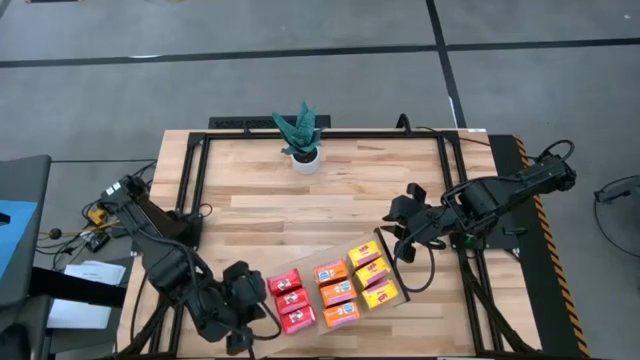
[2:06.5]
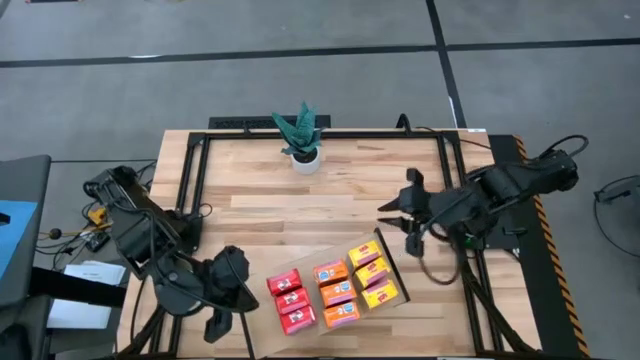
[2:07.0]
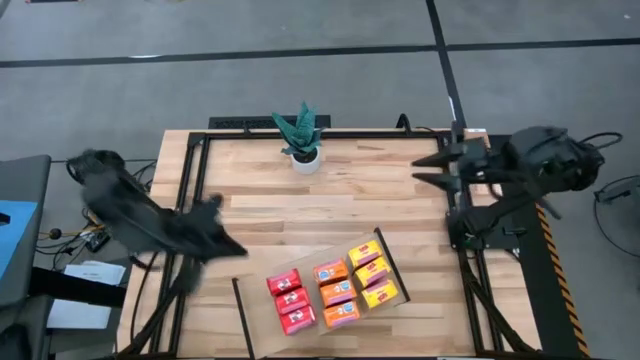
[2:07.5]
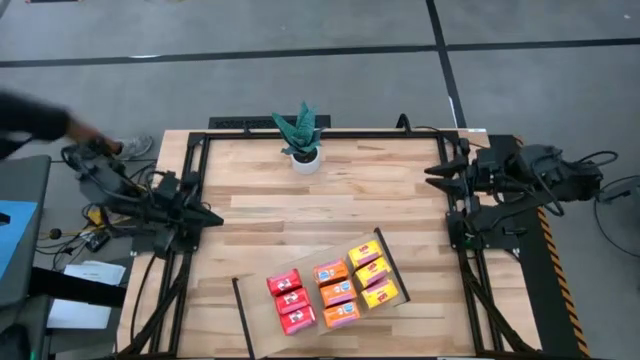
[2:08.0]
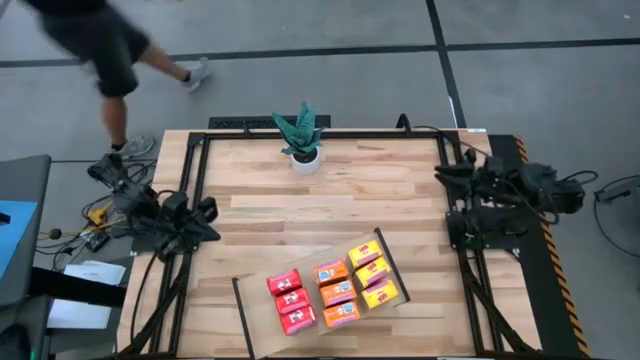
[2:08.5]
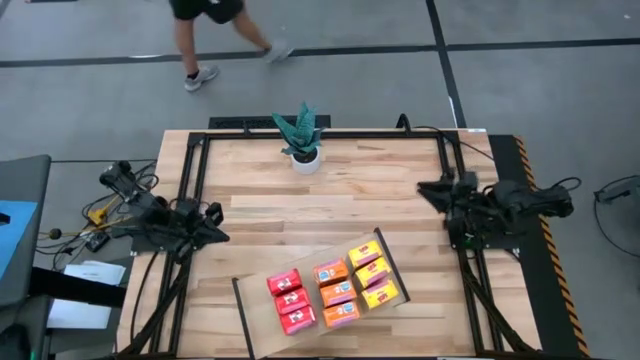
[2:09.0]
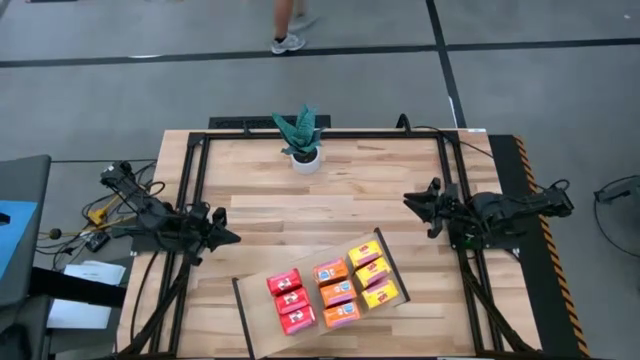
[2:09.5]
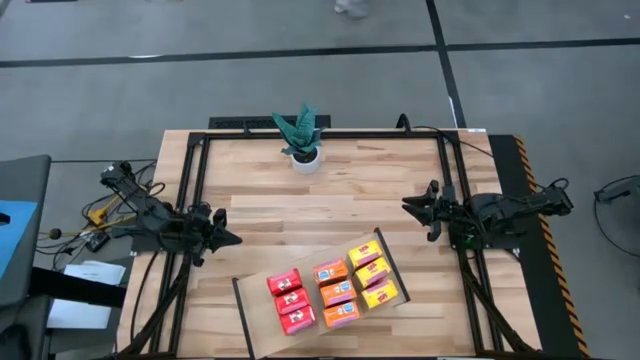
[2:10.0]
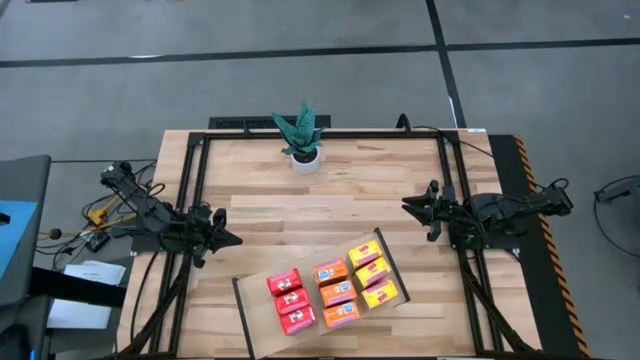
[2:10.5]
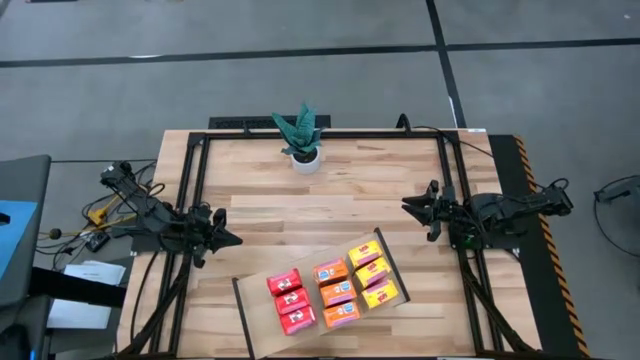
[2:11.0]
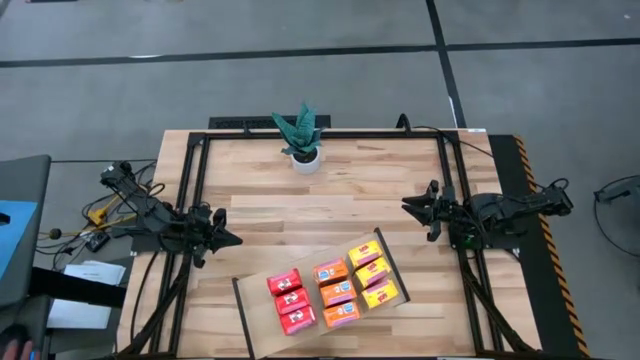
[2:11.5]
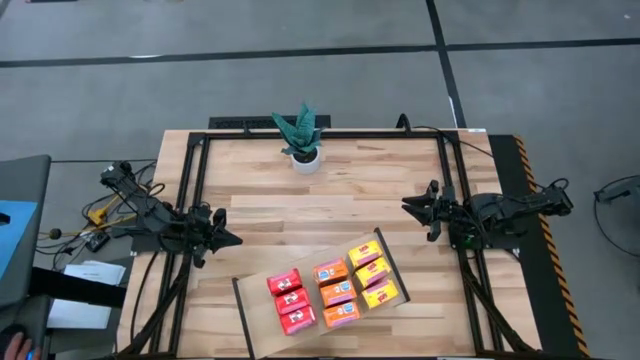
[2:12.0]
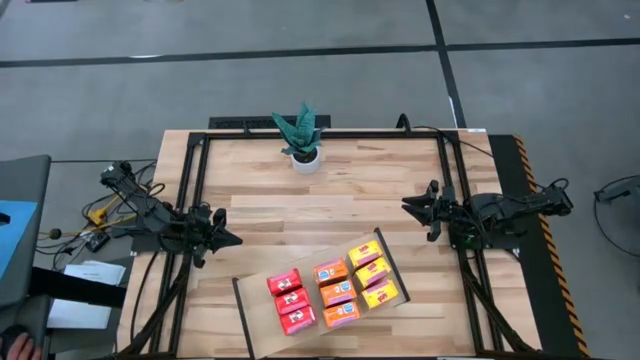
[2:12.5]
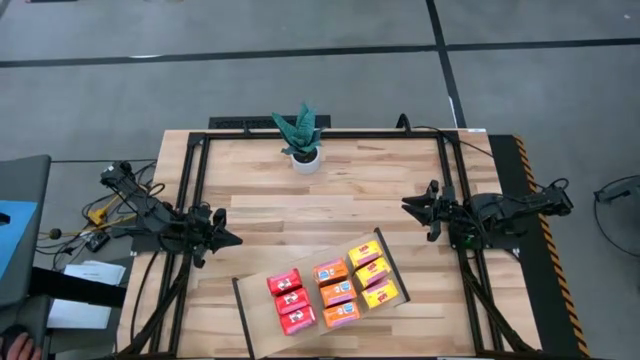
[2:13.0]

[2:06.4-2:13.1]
Task: Stack cereal on shelf
Return to Home Position

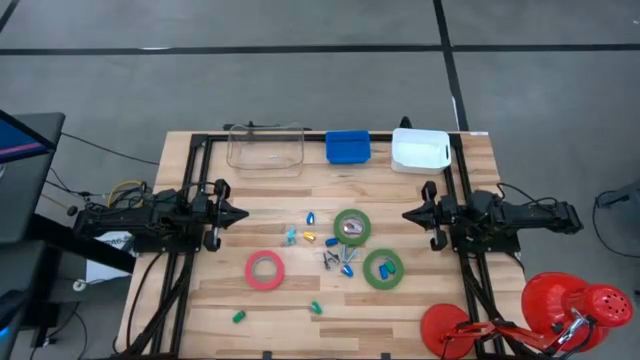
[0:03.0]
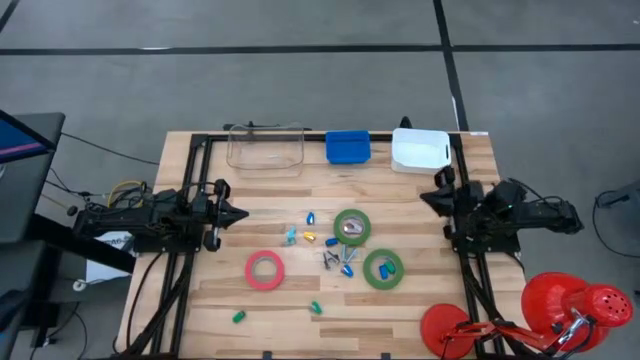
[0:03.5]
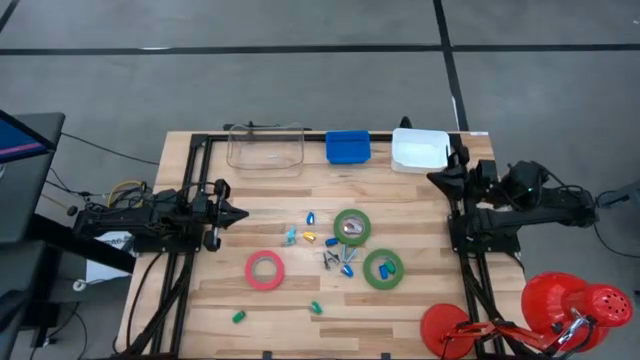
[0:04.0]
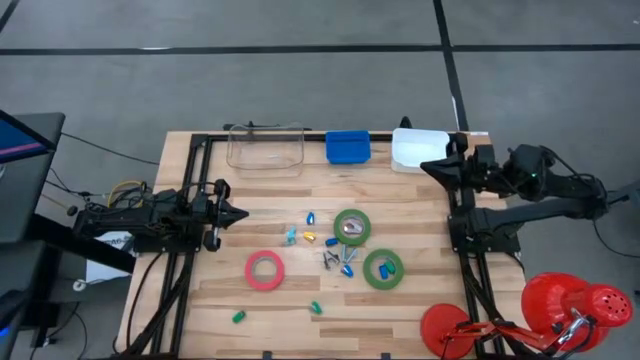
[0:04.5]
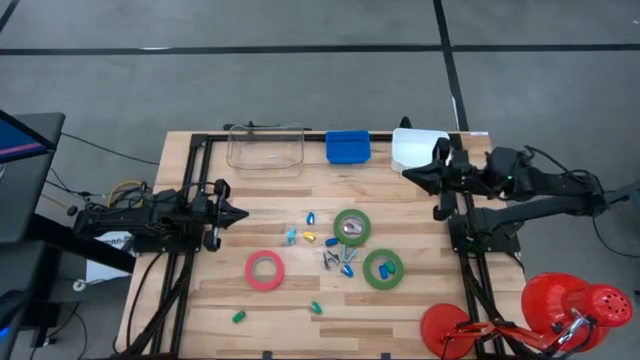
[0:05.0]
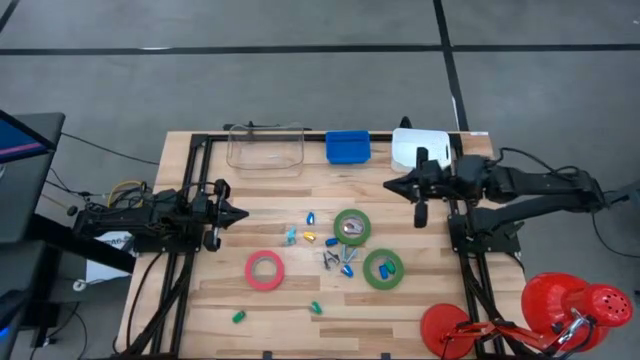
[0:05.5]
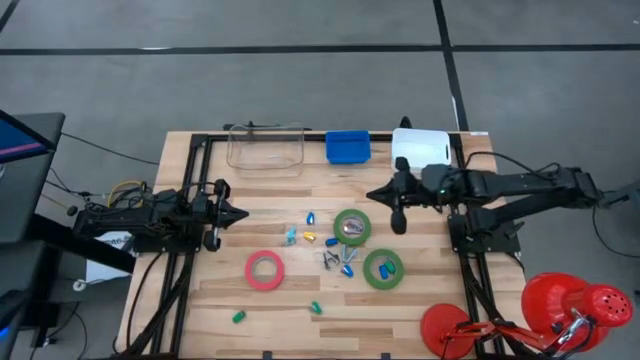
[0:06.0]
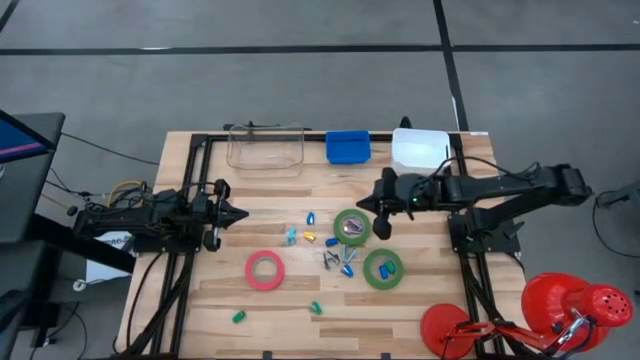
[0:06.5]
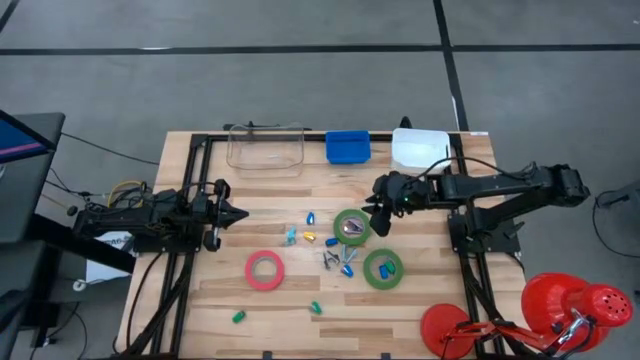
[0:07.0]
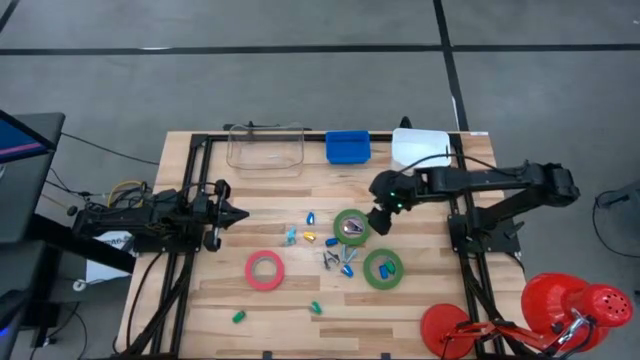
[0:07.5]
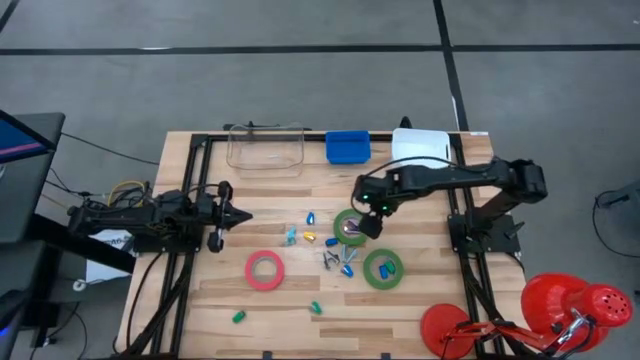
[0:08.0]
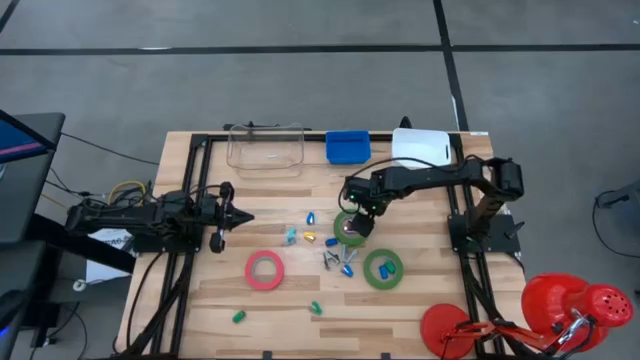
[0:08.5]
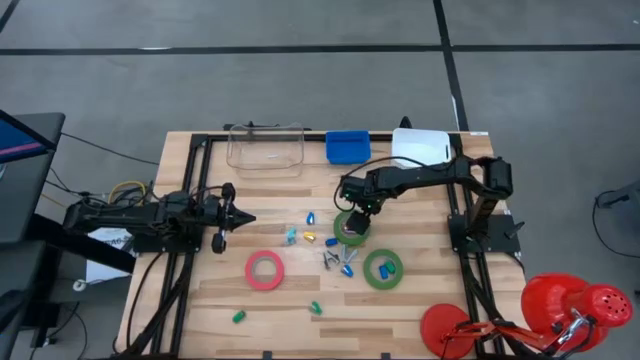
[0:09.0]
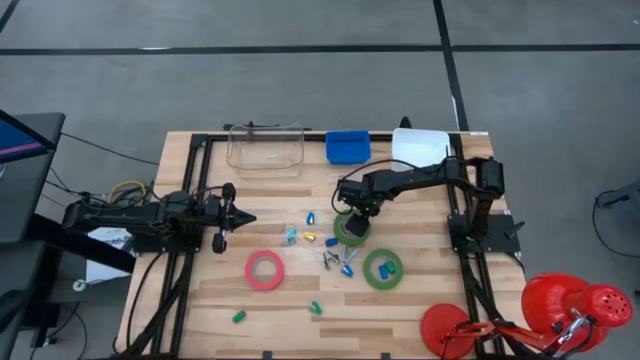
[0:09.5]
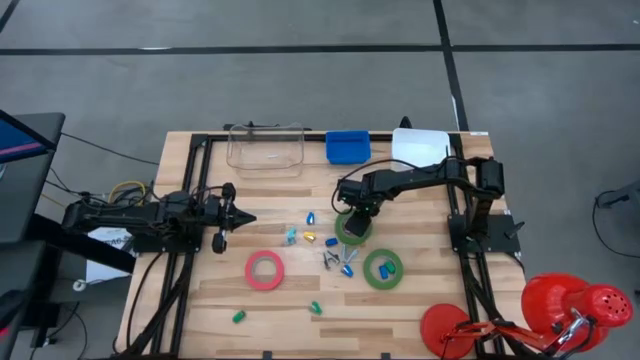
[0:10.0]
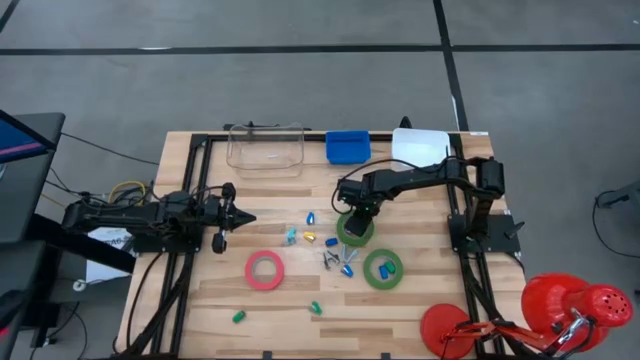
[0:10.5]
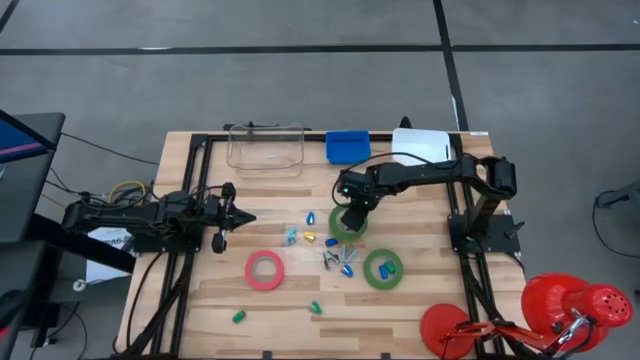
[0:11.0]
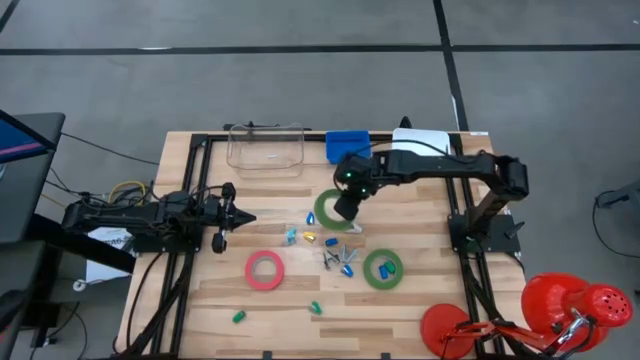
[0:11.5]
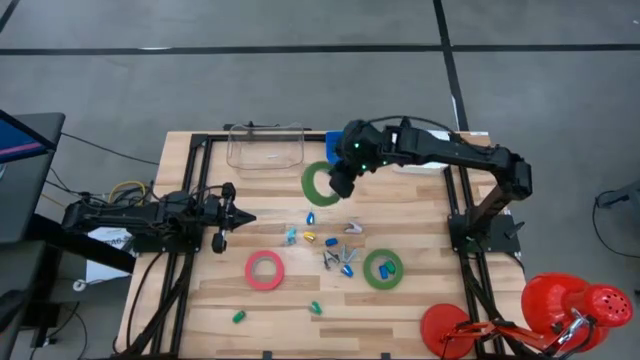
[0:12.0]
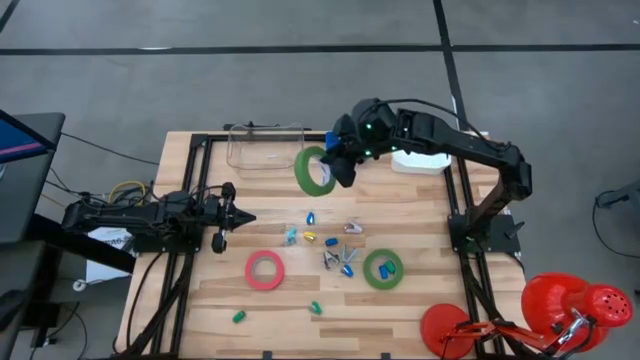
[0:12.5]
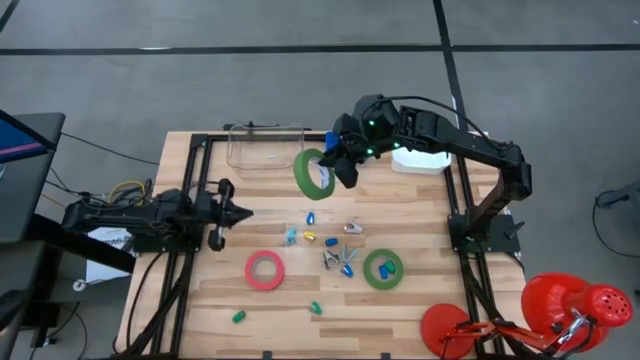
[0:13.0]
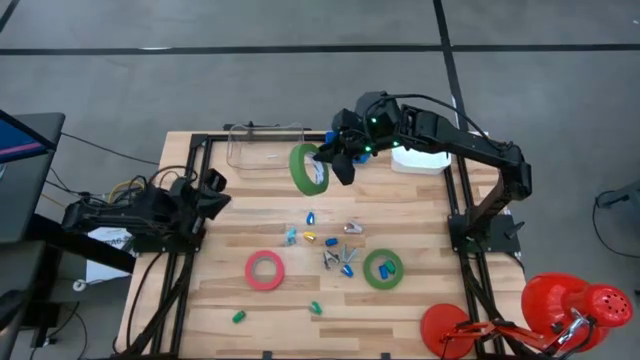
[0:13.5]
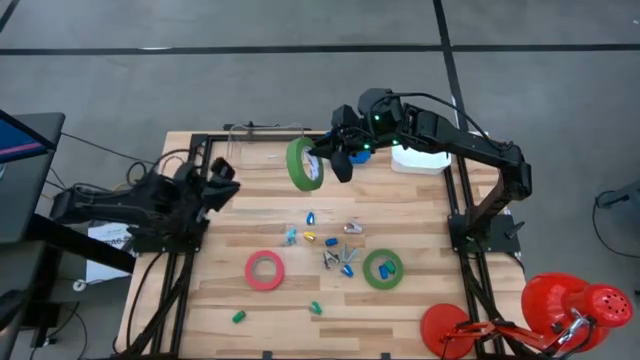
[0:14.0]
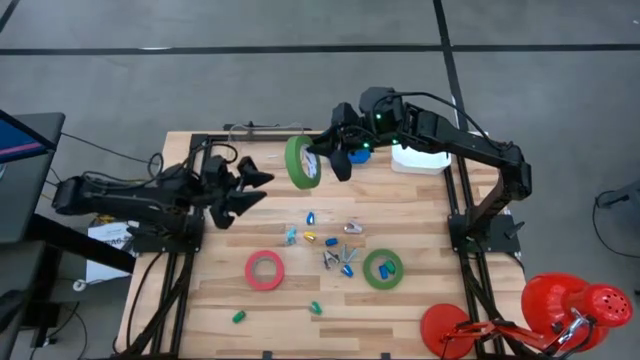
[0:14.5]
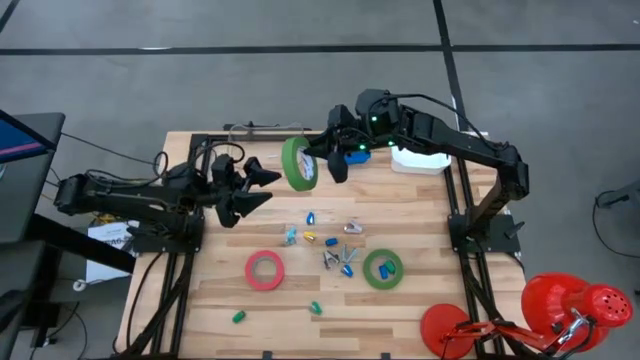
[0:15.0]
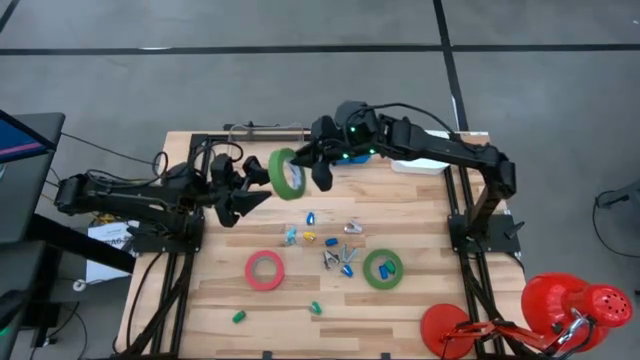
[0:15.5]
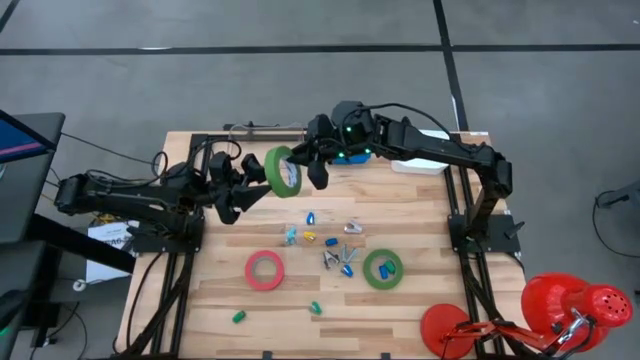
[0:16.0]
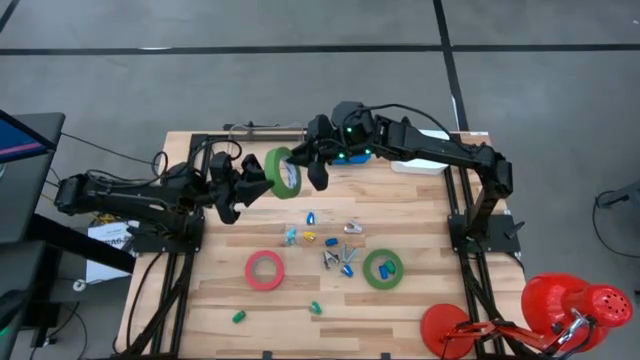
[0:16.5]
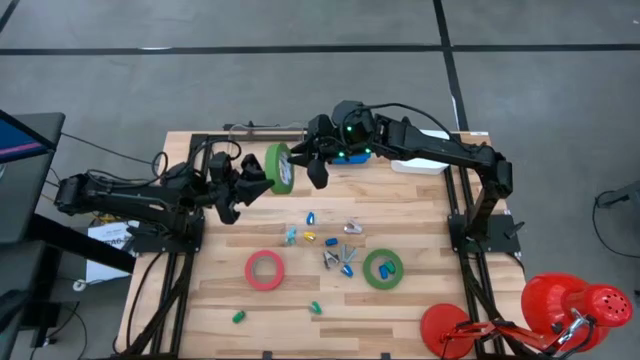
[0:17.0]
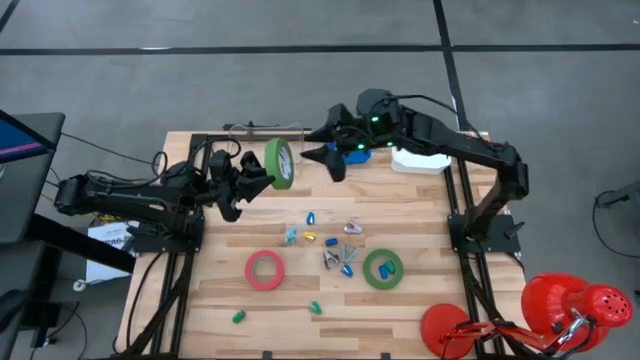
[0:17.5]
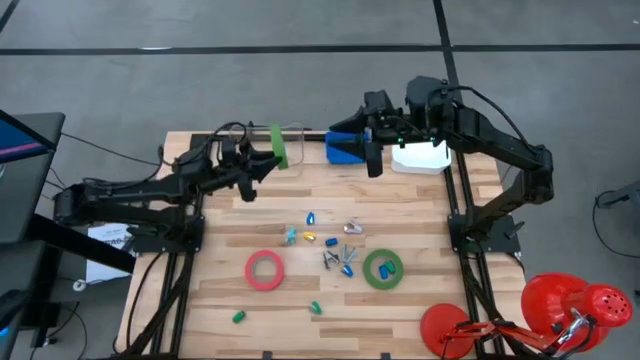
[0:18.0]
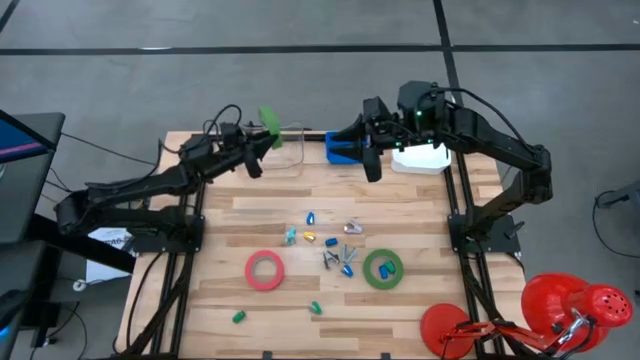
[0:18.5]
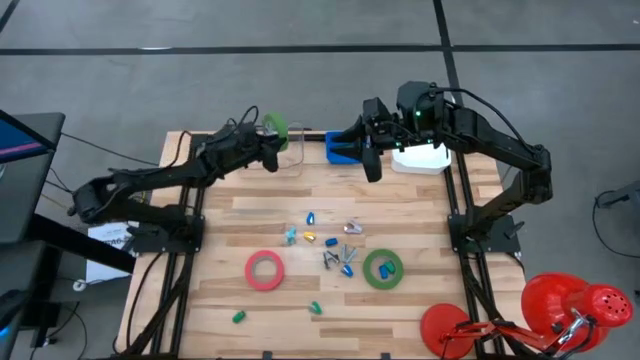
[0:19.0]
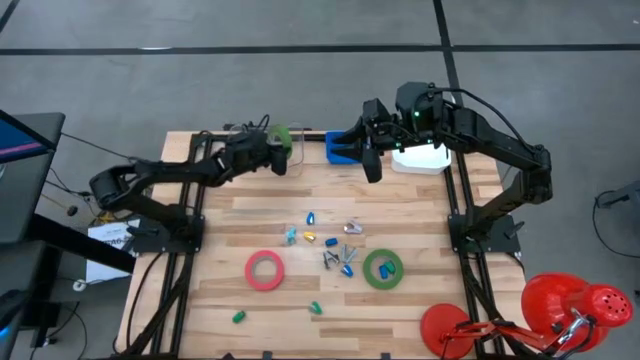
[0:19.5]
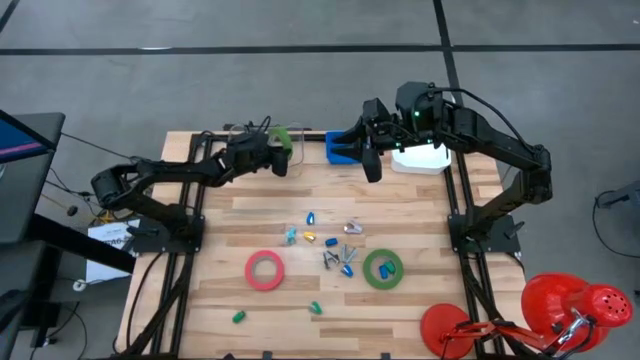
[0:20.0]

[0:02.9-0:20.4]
Task: Pick and place Stapler, Stapler remover, tape
Put the green tape into the transparent bin
